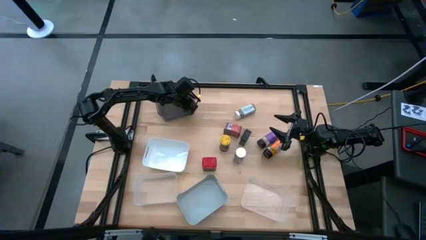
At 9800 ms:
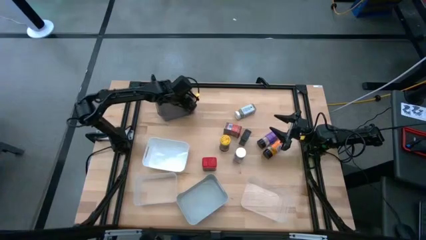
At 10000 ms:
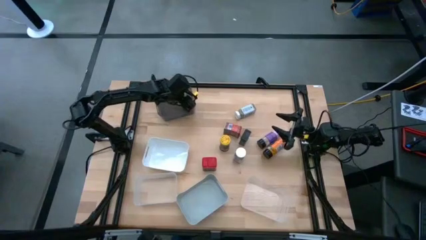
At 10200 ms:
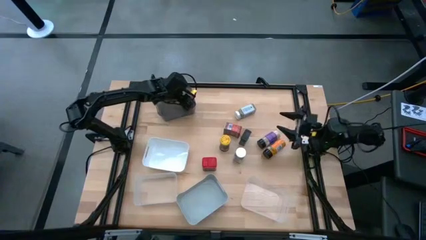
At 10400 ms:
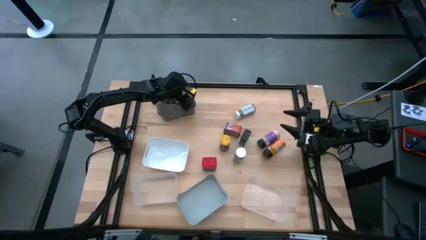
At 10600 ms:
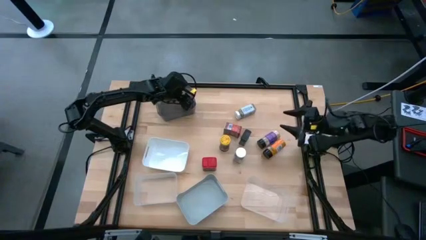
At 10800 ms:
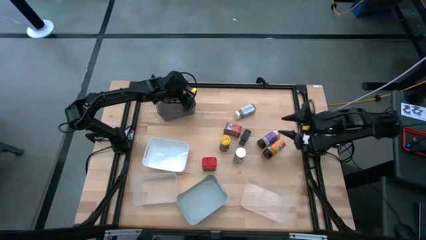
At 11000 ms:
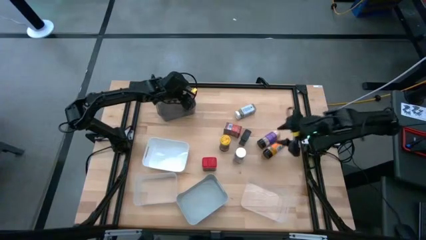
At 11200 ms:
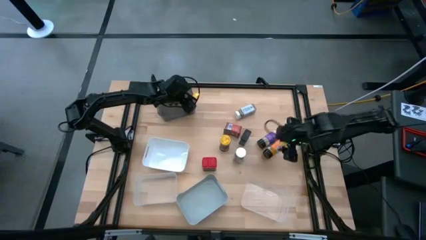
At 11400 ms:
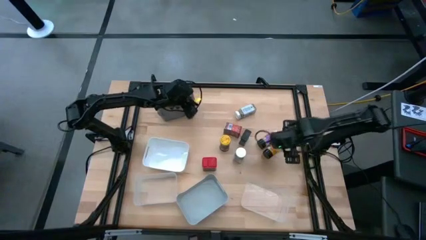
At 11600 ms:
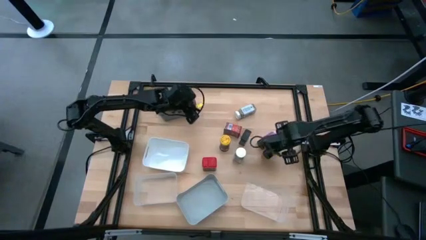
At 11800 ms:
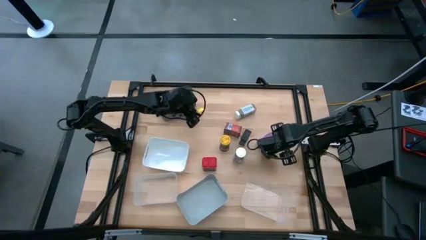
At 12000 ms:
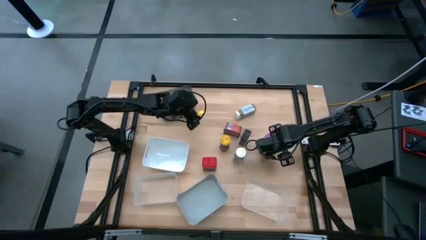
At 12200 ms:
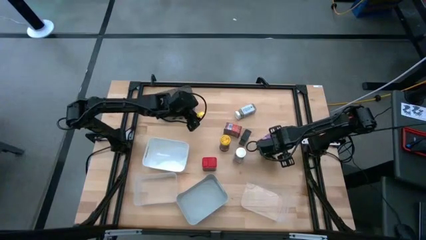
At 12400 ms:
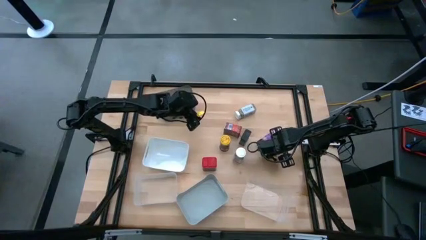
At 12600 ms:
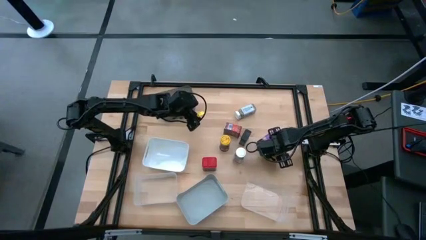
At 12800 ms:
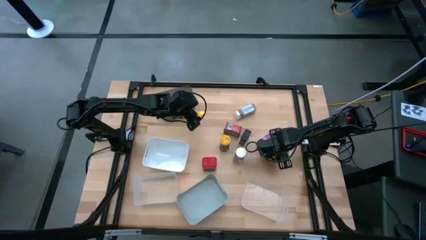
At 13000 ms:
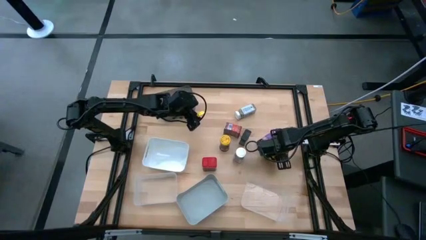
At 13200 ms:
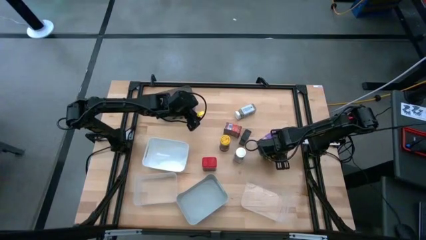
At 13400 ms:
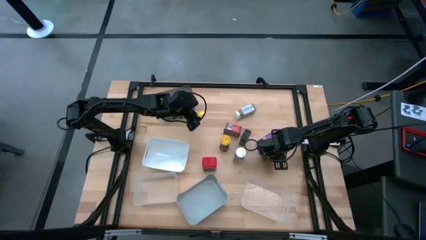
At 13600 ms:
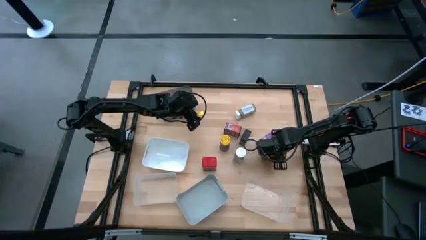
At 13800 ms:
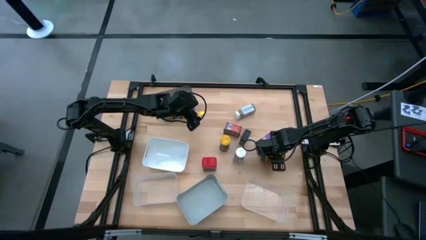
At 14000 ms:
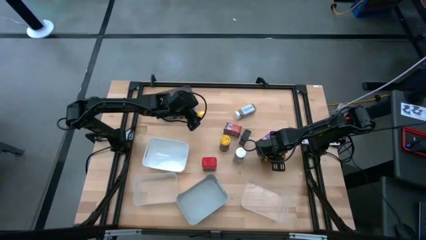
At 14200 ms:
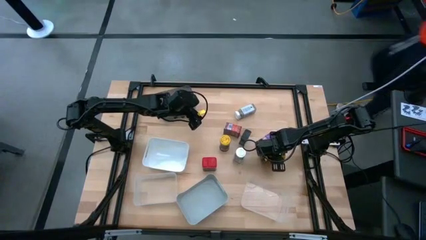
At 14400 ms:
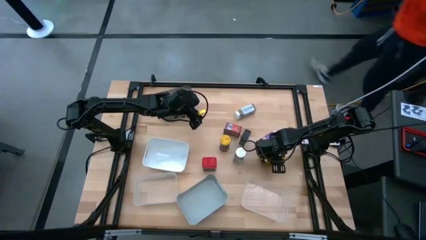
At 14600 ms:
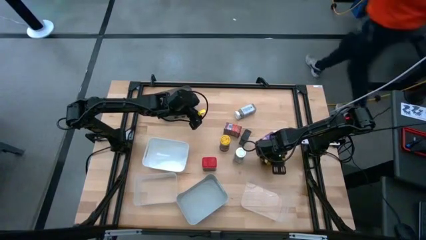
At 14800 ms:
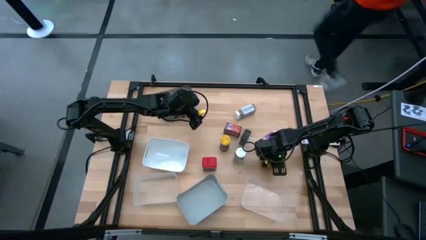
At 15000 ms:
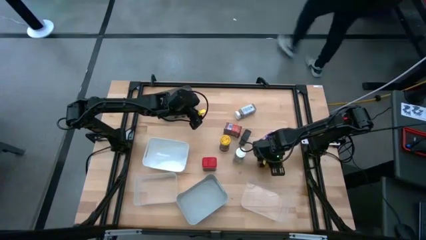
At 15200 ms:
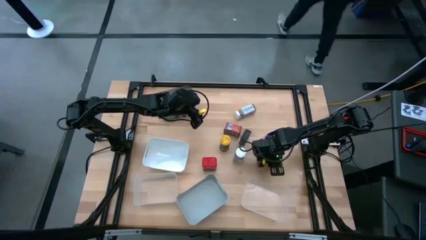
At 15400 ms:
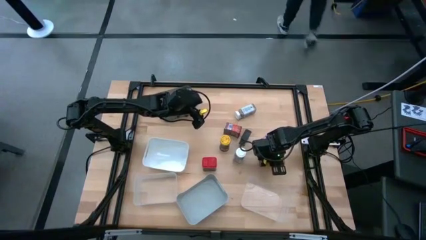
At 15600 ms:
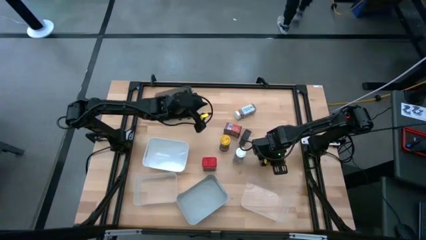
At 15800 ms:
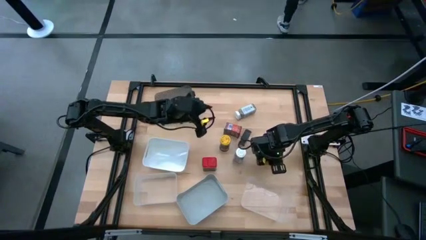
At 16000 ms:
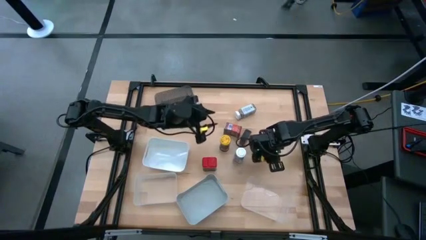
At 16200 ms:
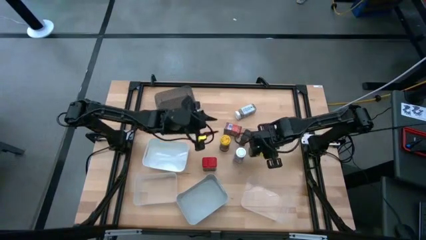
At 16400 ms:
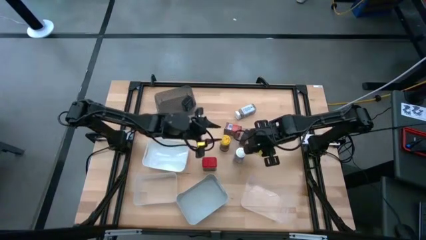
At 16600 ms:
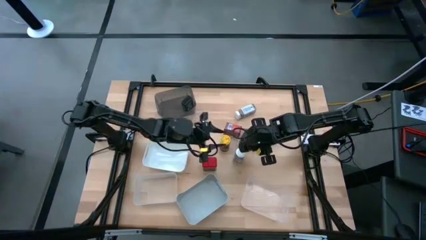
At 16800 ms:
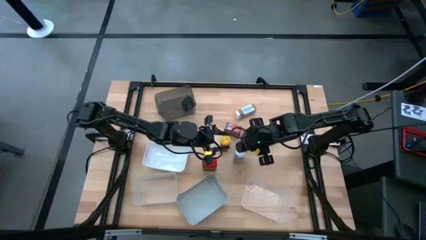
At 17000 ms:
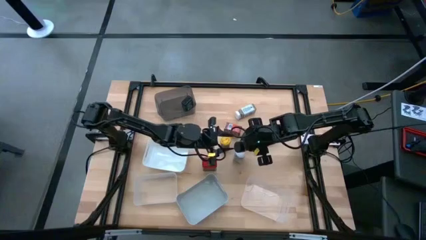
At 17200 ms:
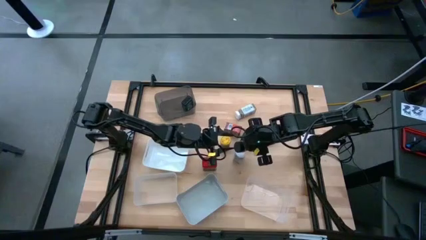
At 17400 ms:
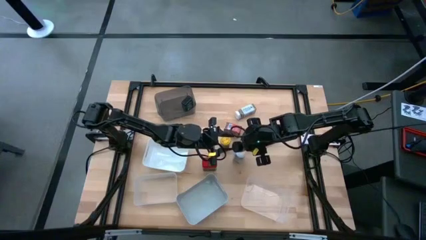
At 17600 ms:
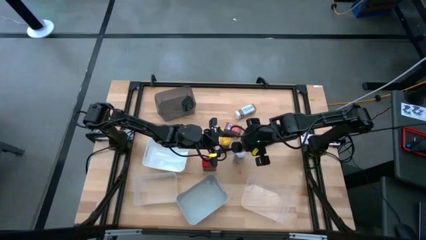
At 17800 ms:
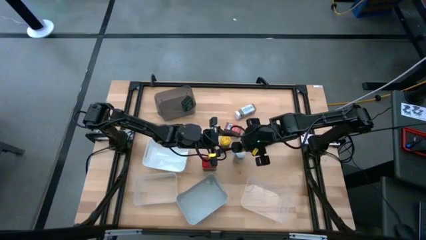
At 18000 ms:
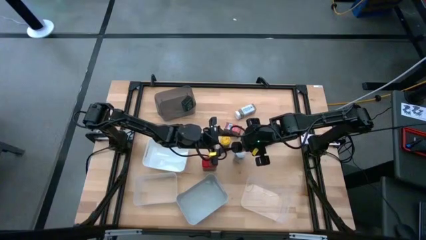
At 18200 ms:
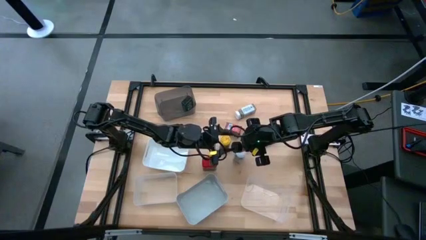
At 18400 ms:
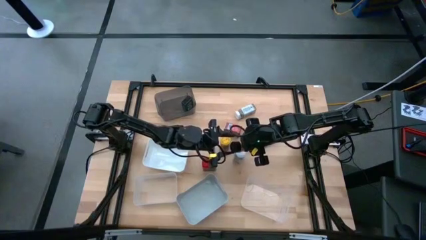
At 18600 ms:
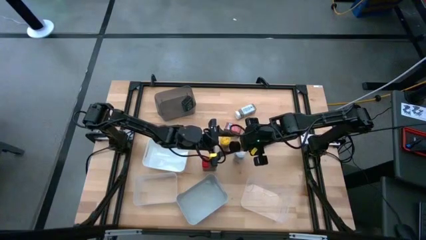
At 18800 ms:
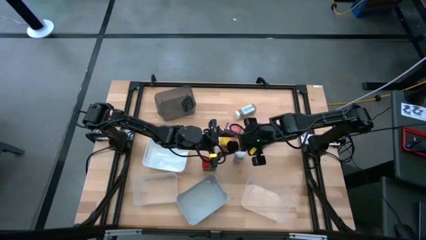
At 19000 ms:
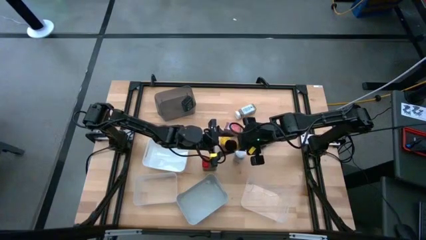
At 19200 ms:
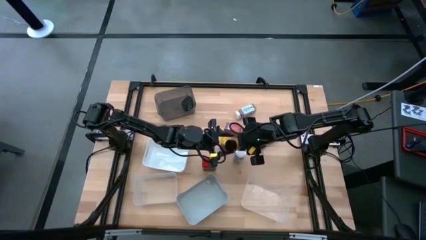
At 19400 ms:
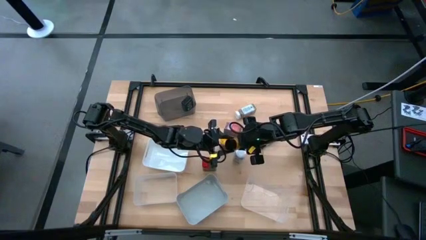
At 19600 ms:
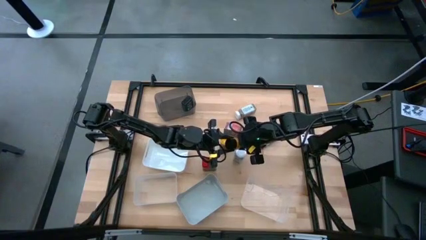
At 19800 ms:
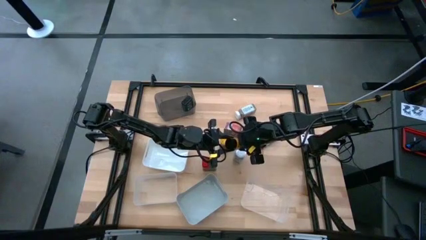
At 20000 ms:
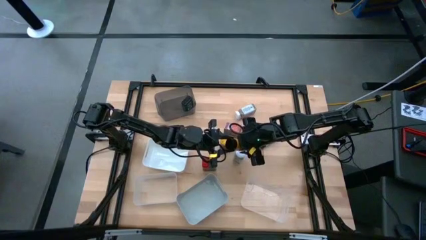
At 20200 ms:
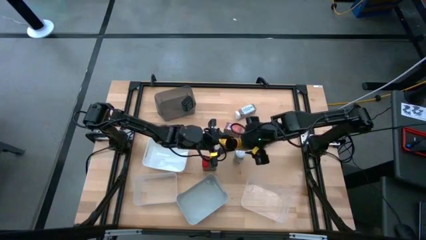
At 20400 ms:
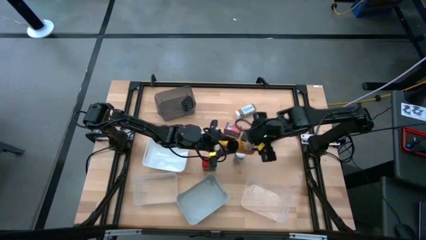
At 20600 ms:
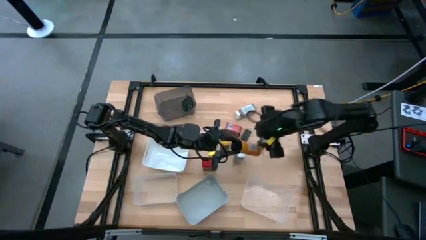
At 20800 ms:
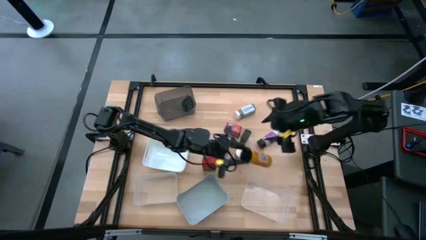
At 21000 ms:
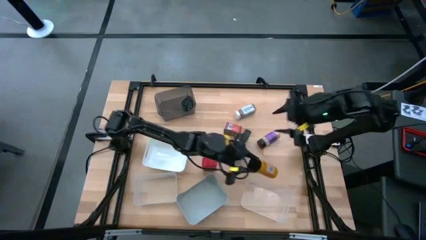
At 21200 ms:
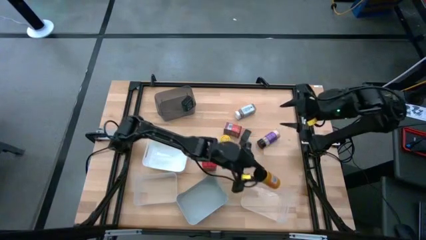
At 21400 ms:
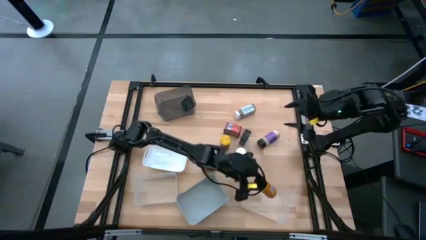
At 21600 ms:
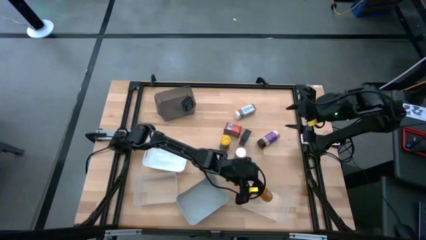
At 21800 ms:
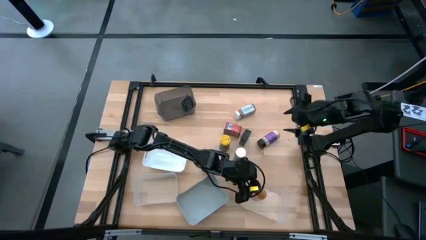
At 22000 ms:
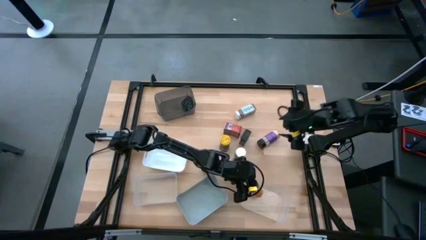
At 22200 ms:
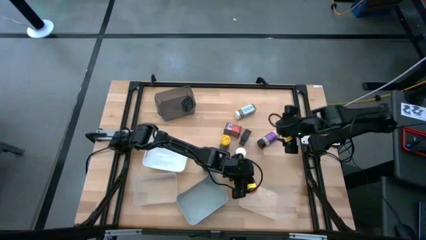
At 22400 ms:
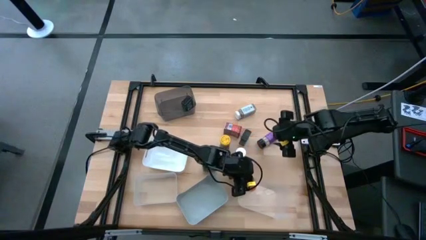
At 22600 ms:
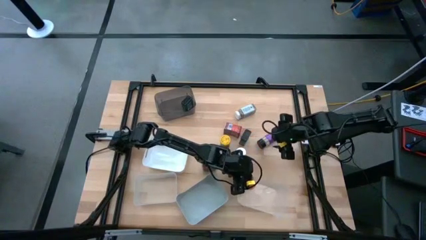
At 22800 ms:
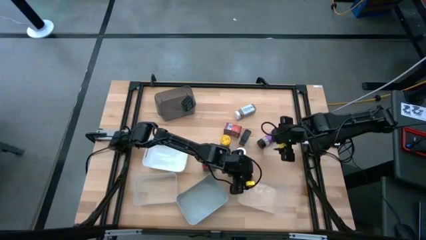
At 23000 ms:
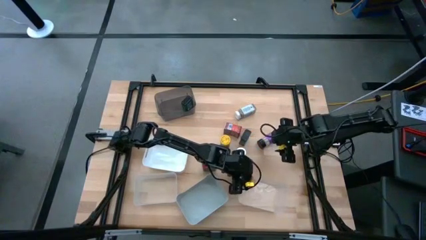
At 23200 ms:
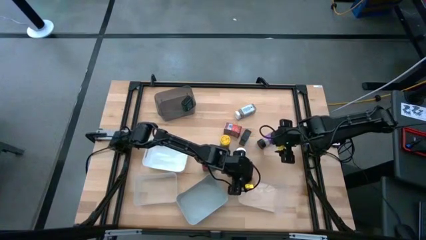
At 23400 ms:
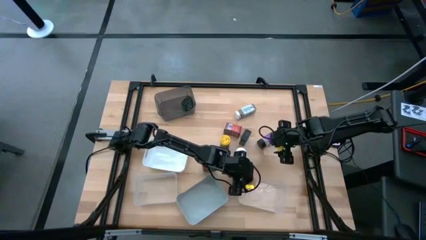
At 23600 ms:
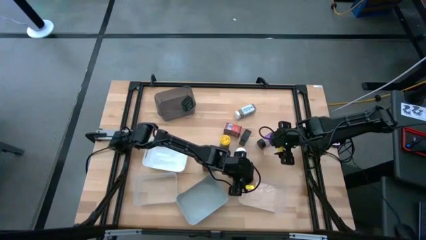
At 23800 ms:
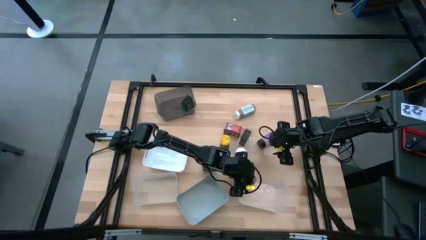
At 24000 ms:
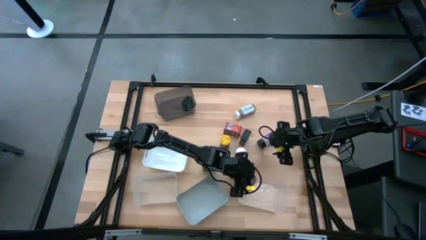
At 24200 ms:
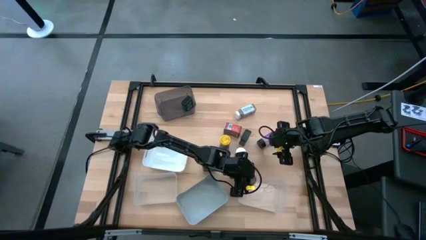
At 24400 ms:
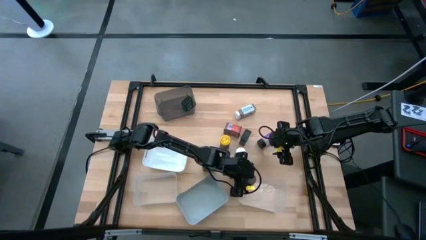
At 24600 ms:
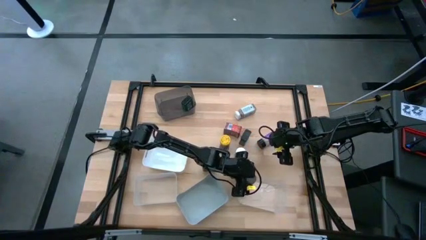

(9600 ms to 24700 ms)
Task: Sort spices by type
Put the bottom black seasoning bottle into the right transparent bin
